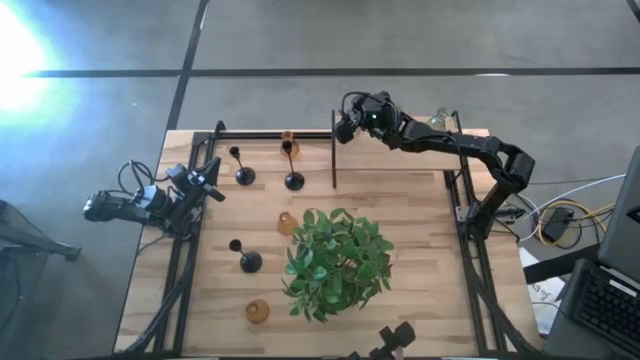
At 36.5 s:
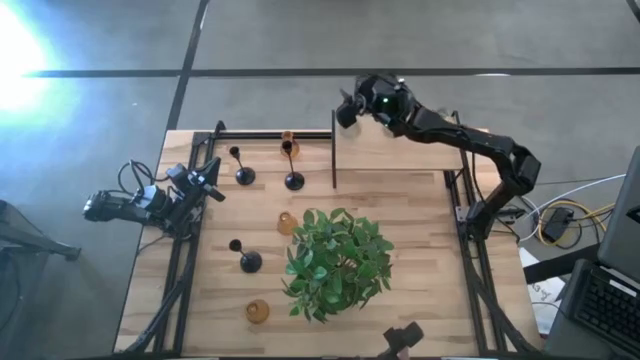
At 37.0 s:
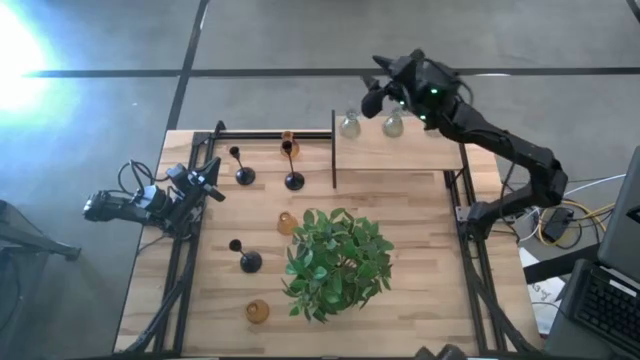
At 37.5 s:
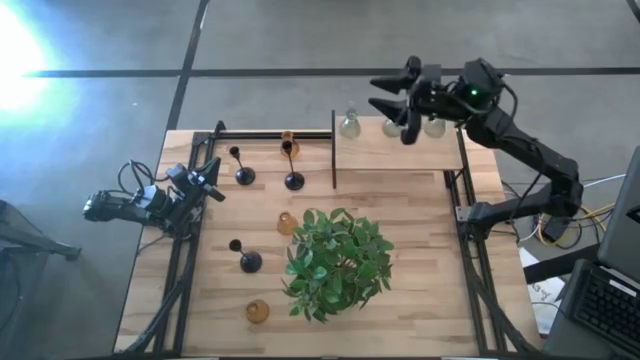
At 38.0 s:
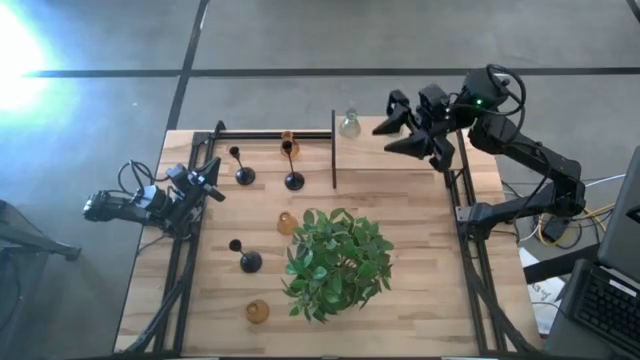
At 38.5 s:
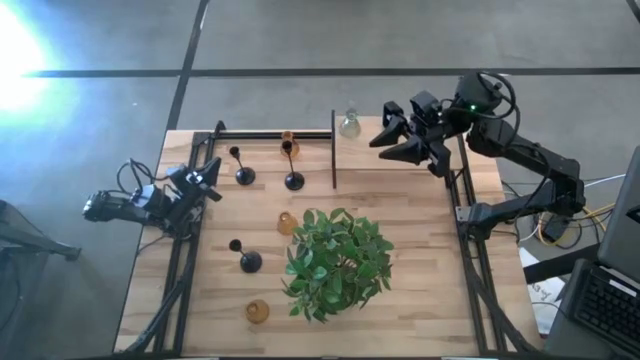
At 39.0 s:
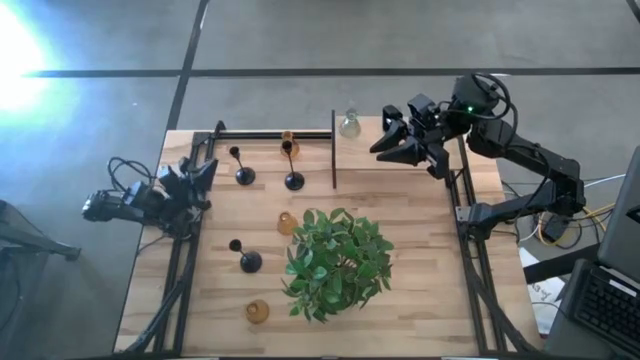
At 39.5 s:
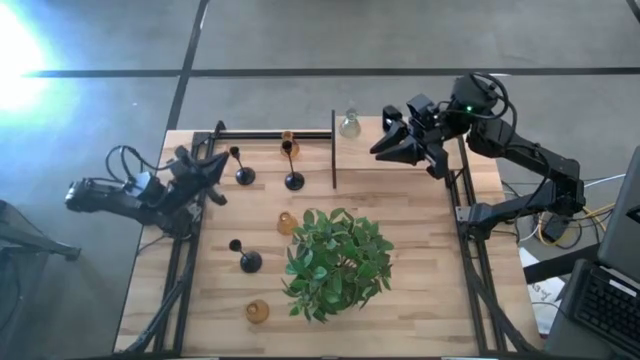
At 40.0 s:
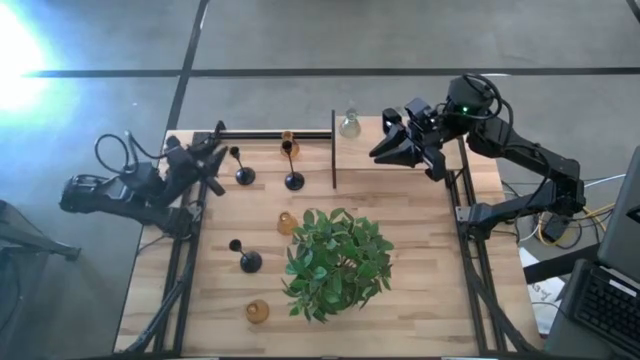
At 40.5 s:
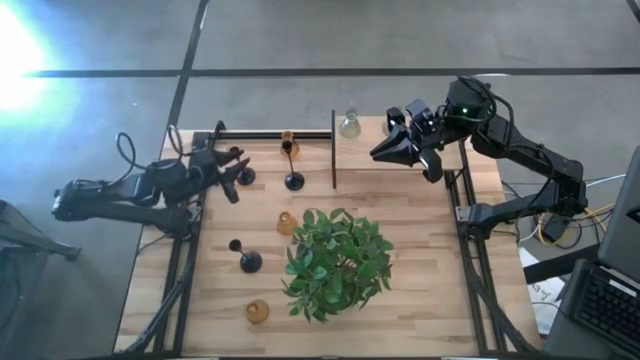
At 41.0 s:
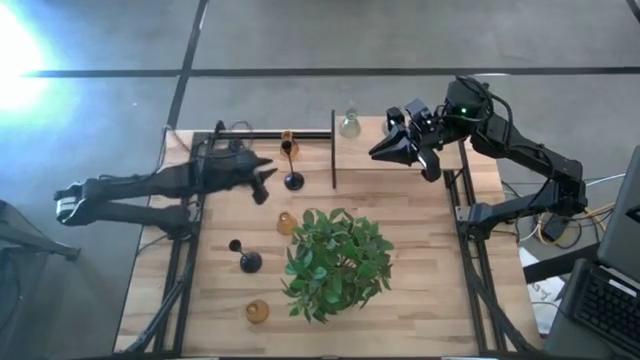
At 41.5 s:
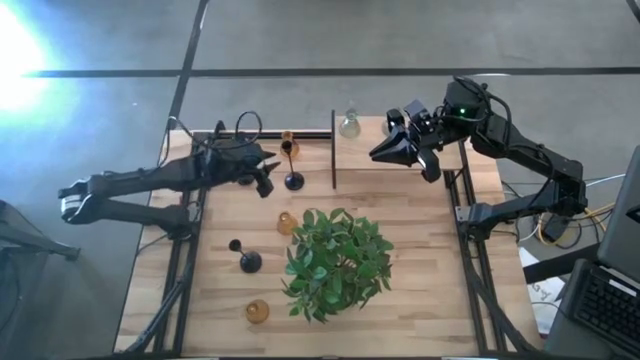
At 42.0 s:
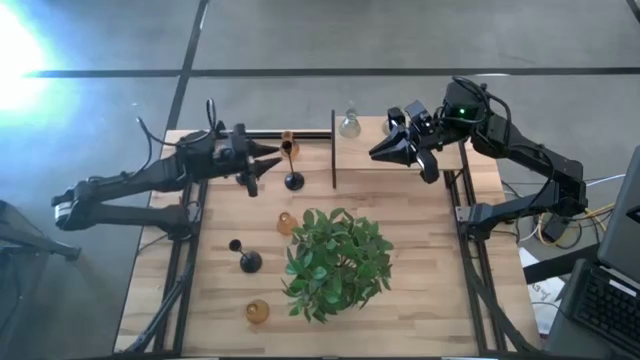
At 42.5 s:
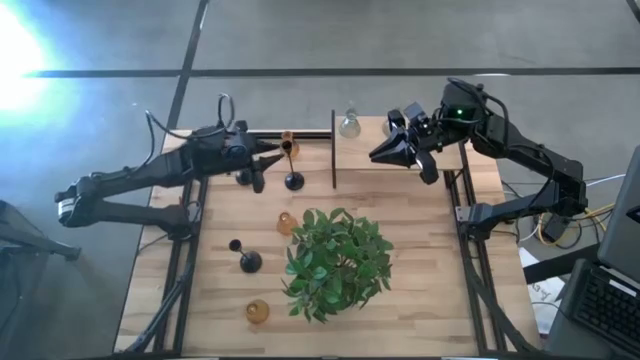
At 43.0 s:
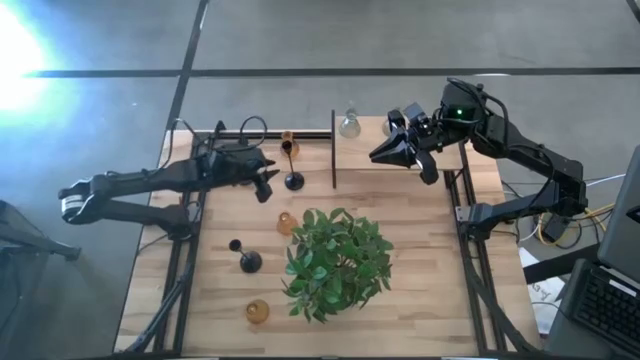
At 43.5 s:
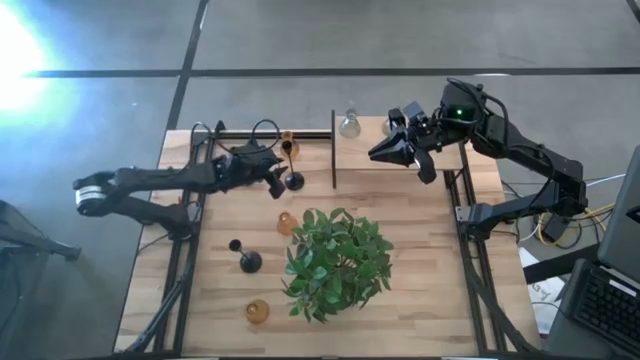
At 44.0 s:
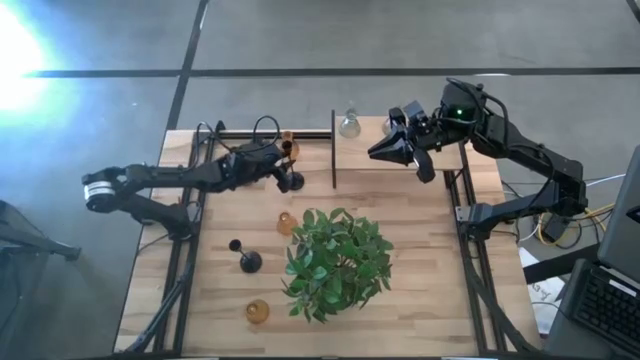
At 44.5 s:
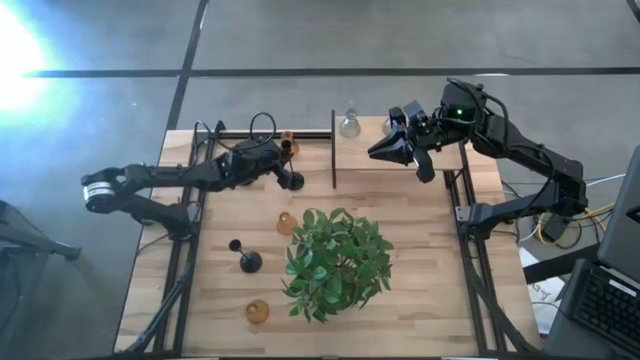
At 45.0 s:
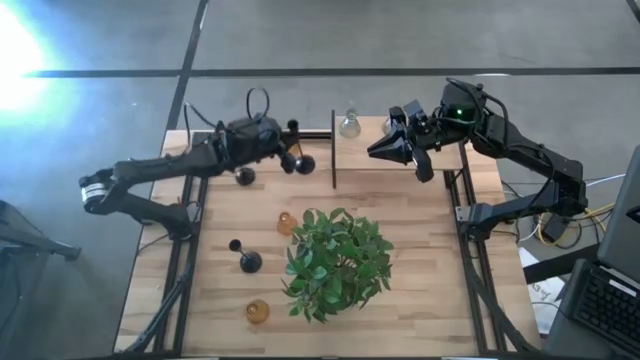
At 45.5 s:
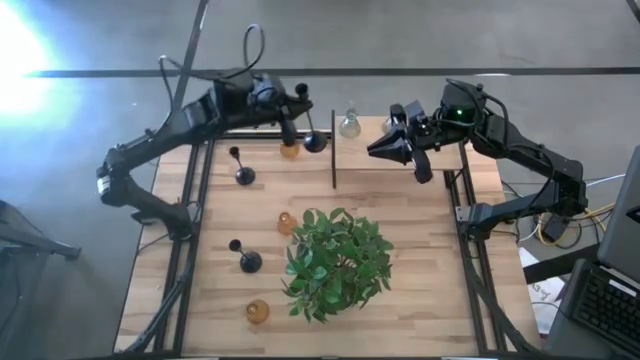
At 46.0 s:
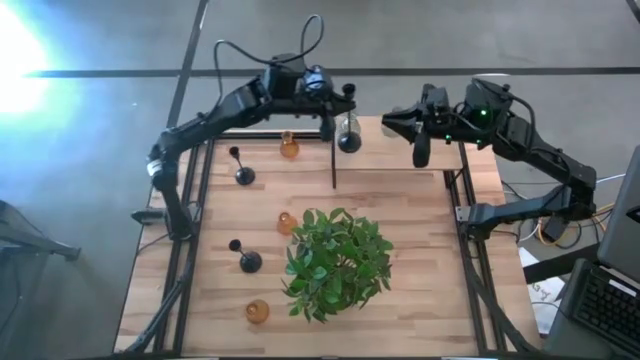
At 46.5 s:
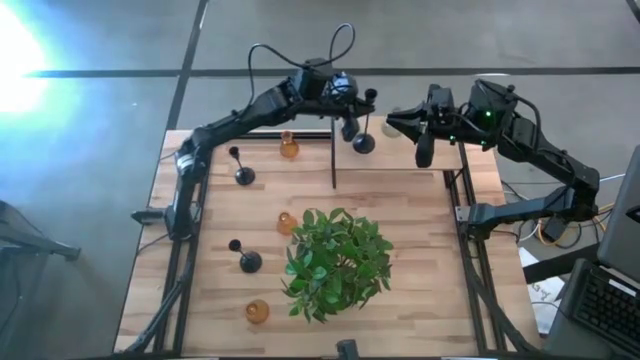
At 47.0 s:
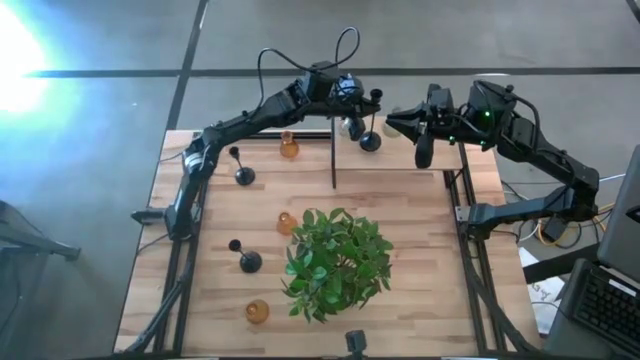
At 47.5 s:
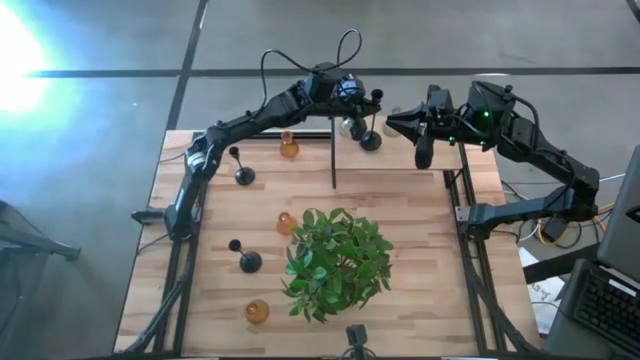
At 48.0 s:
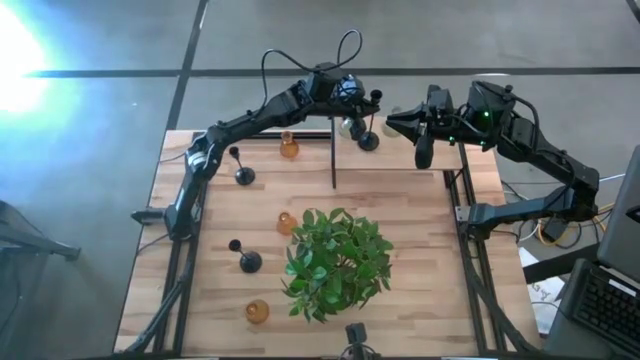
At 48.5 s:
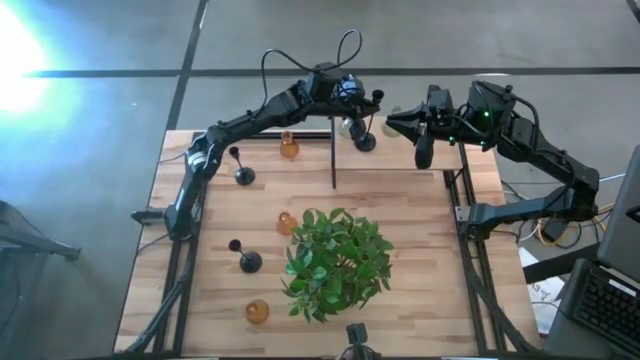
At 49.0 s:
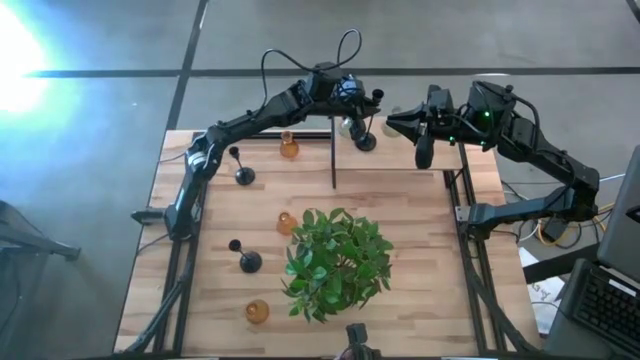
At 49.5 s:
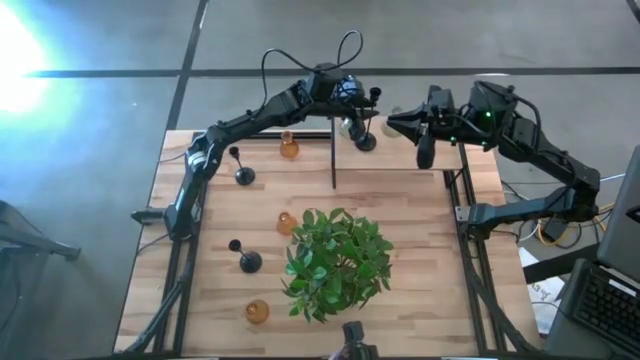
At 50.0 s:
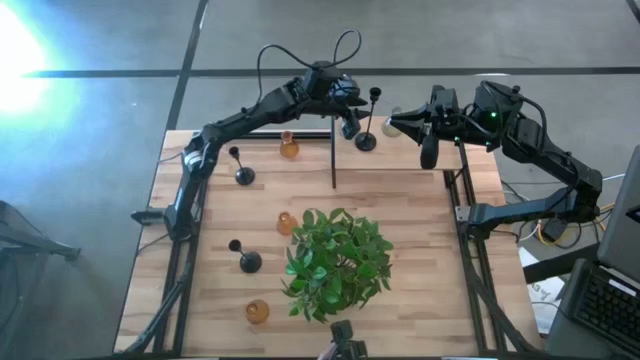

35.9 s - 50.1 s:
Task: Pick & Place candle stick holders
Put the right black candle holder on the shelf

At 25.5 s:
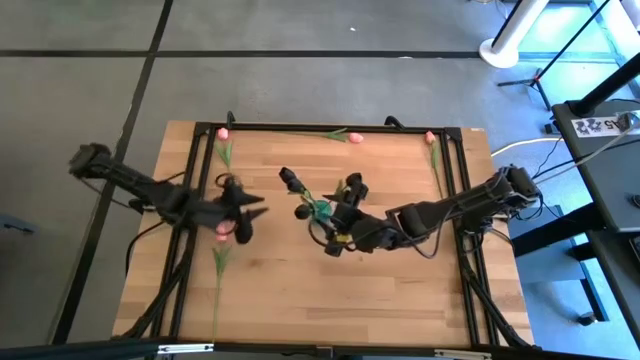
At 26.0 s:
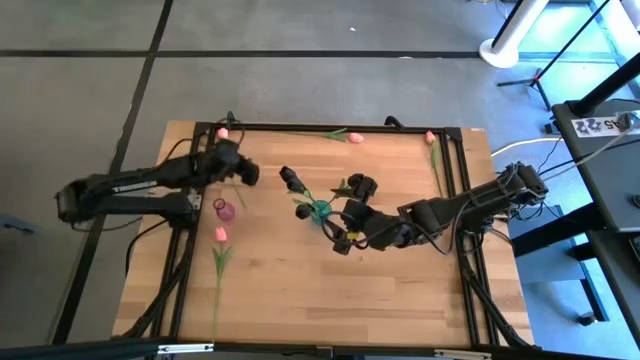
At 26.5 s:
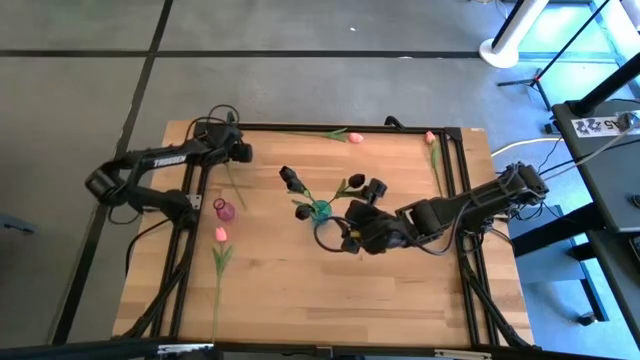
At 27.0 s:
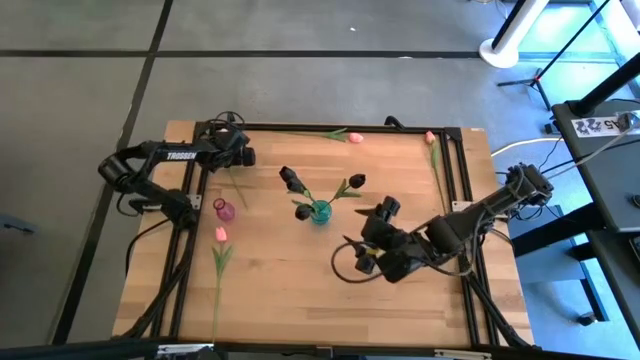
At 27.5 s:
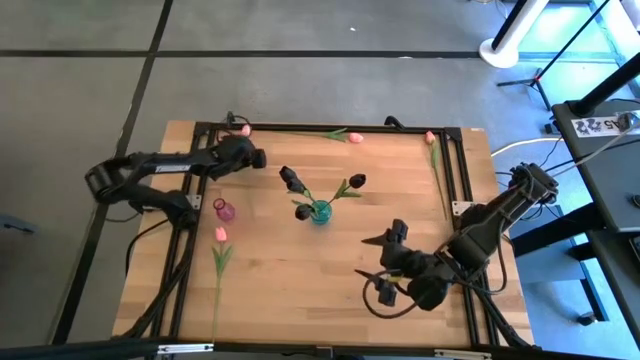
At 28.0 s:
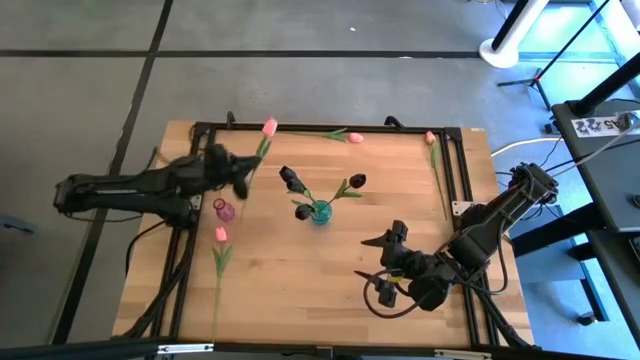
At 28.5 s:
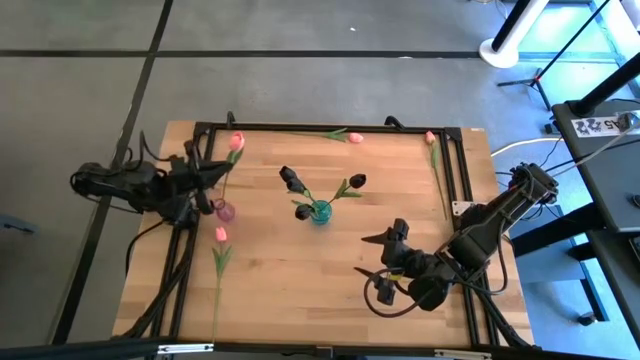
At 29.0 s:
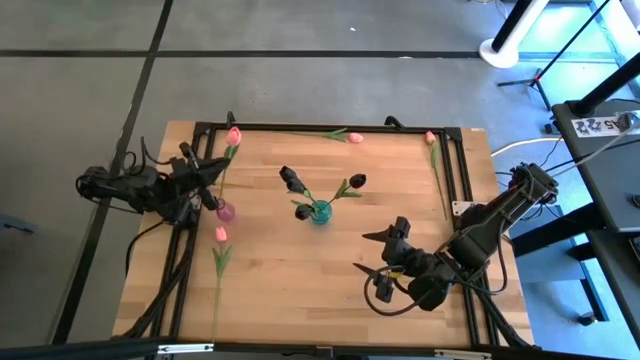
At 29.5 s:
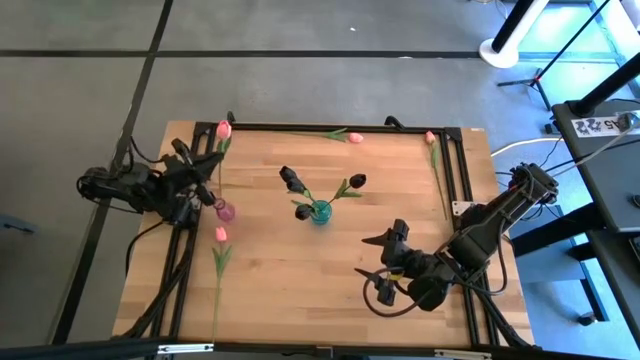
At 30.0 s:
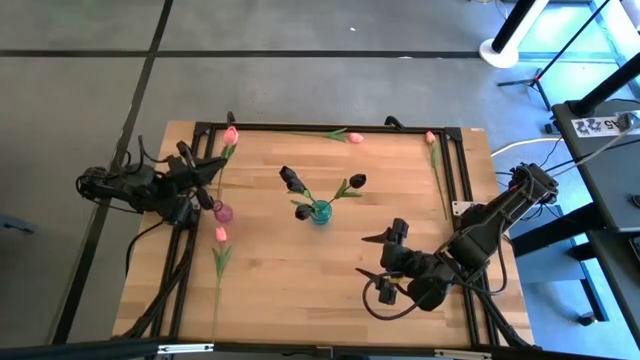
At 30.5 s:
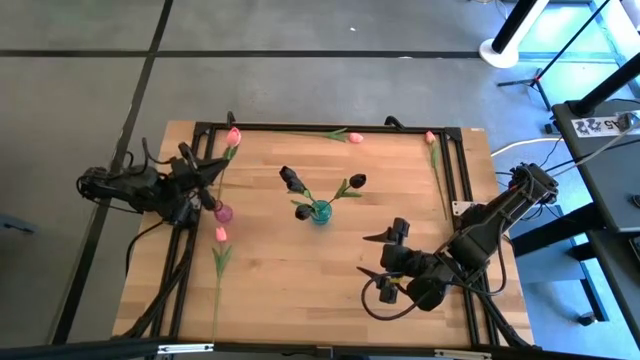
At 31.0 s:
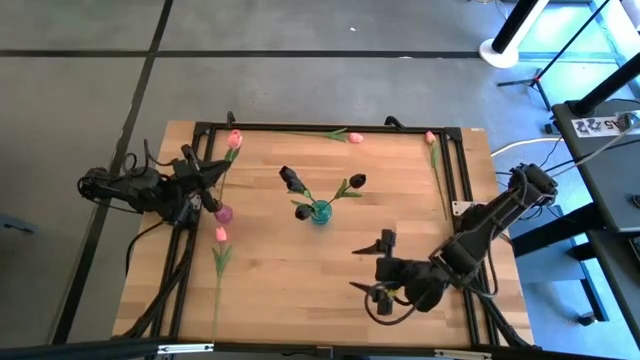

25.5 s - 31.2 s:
Task: Sort flowers into vase by color
Put the top left pink tulip into the pink vase
